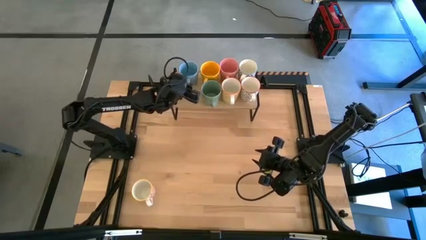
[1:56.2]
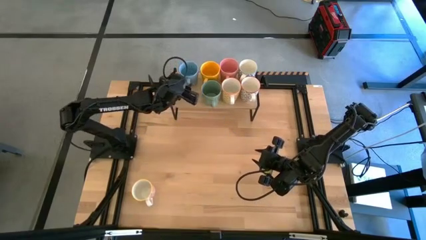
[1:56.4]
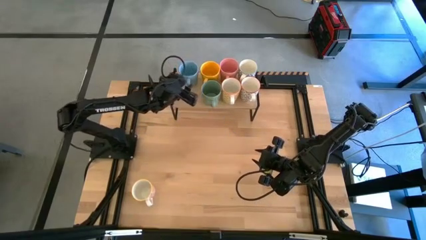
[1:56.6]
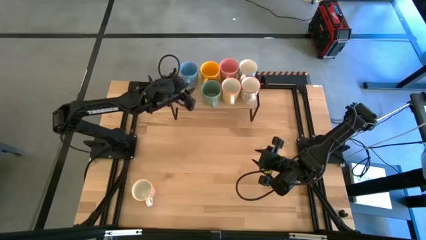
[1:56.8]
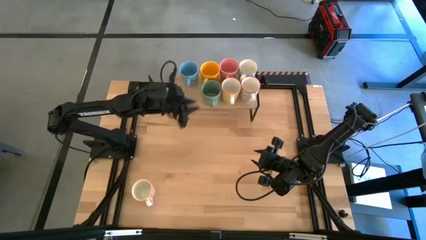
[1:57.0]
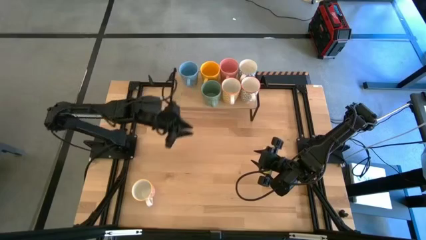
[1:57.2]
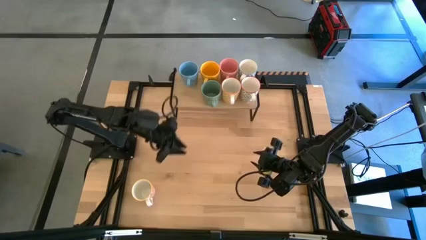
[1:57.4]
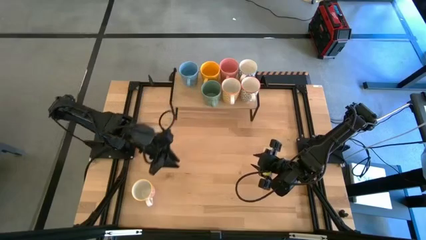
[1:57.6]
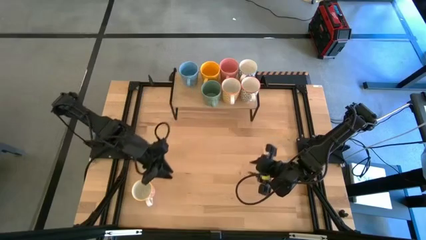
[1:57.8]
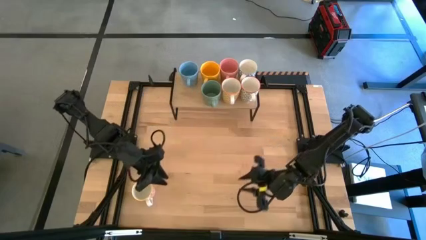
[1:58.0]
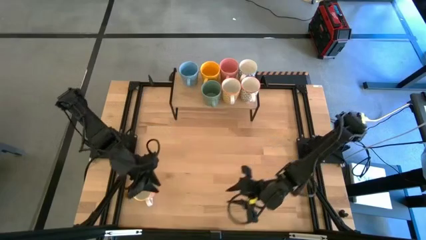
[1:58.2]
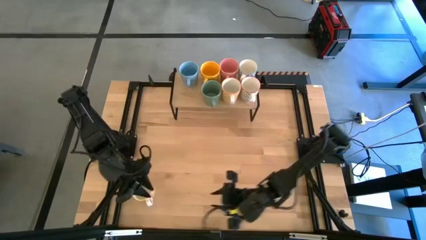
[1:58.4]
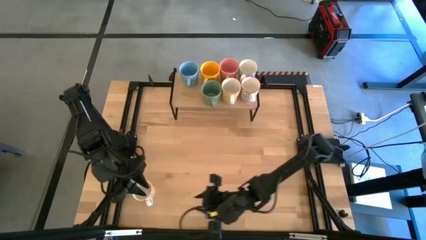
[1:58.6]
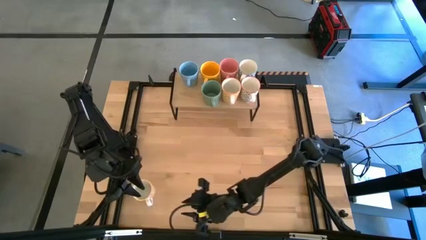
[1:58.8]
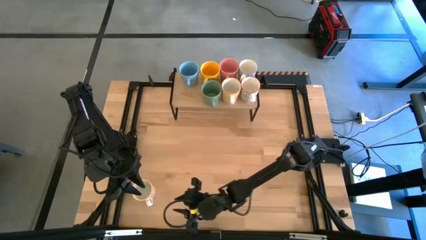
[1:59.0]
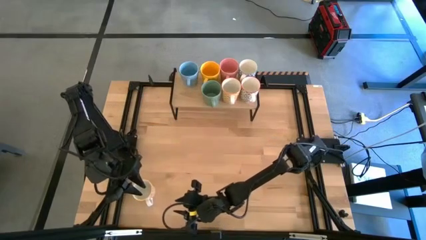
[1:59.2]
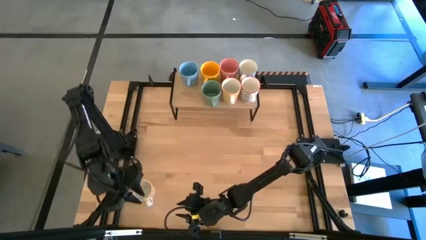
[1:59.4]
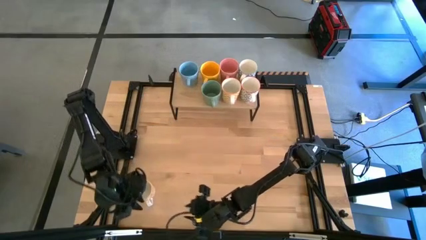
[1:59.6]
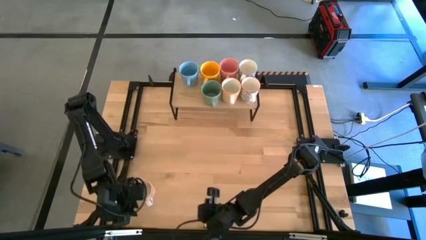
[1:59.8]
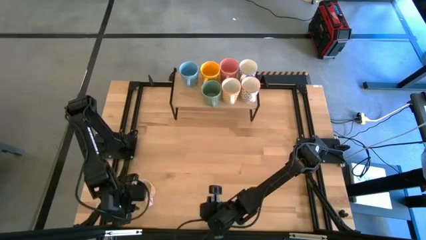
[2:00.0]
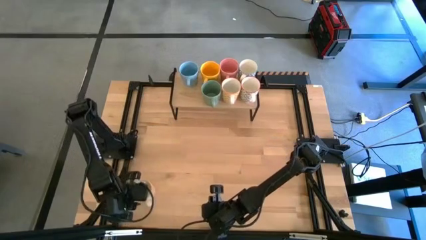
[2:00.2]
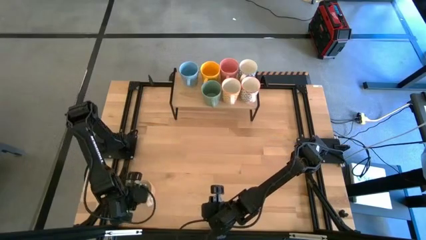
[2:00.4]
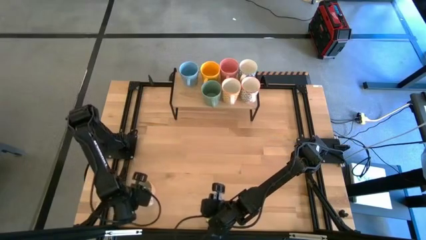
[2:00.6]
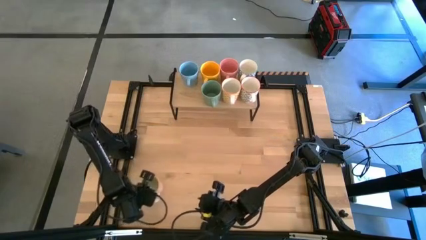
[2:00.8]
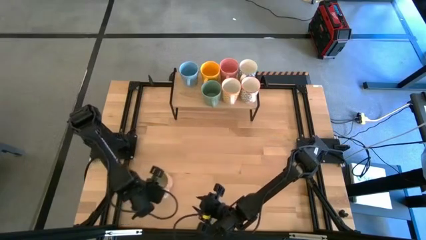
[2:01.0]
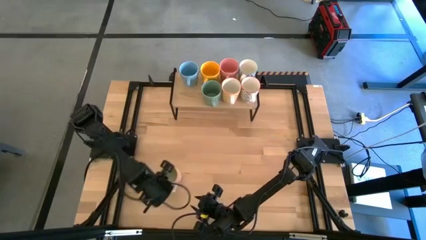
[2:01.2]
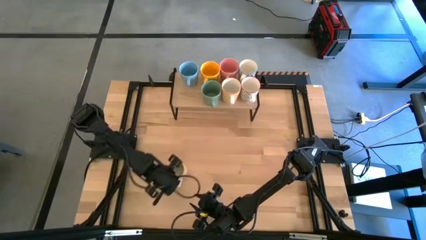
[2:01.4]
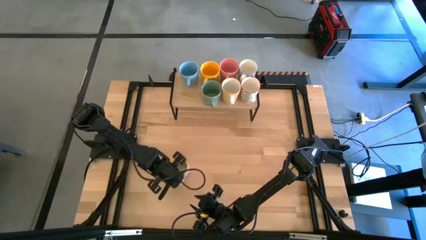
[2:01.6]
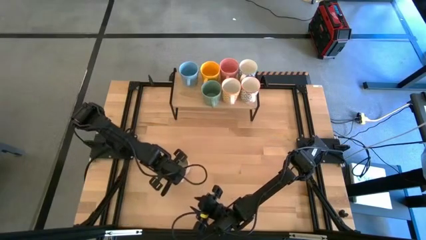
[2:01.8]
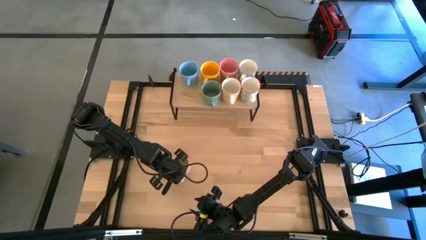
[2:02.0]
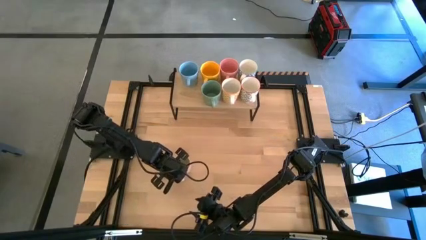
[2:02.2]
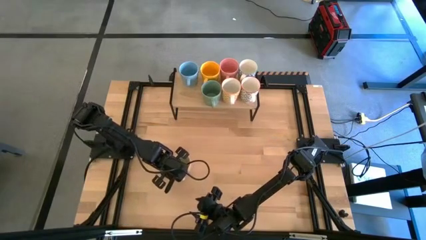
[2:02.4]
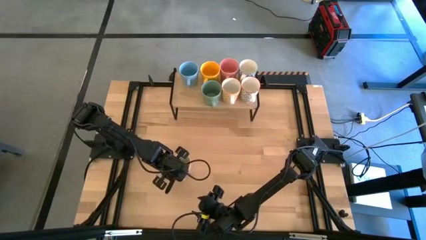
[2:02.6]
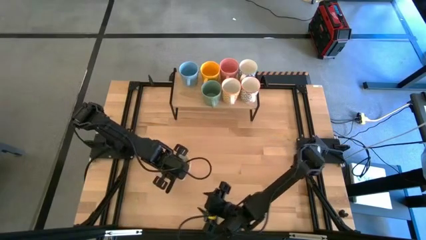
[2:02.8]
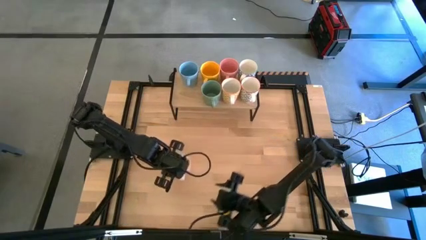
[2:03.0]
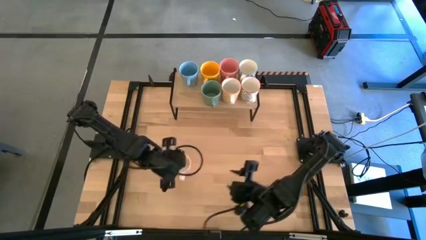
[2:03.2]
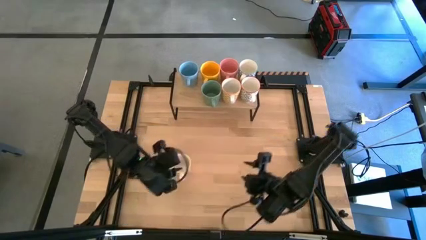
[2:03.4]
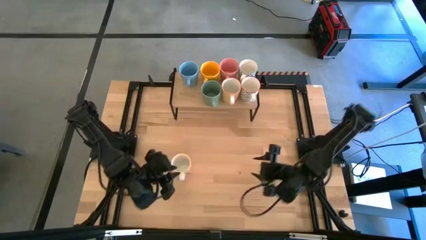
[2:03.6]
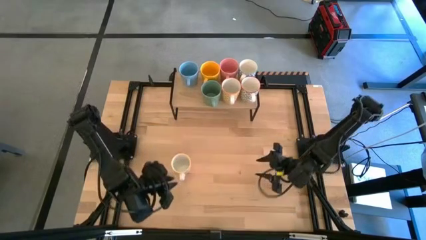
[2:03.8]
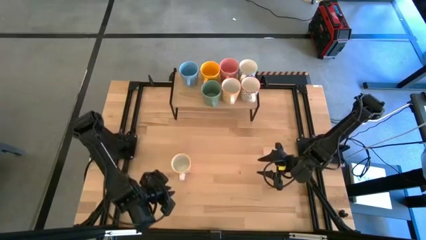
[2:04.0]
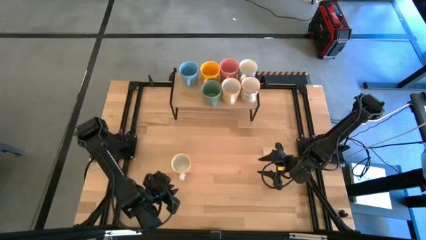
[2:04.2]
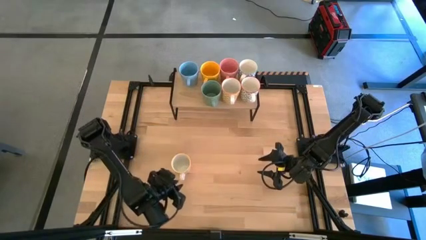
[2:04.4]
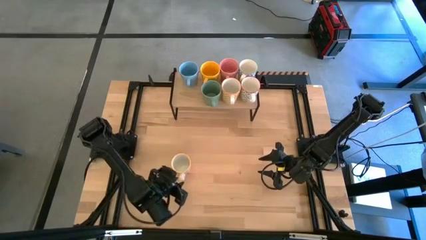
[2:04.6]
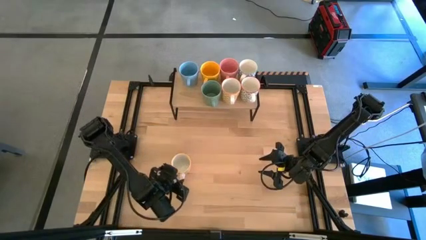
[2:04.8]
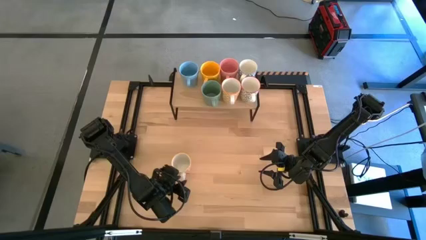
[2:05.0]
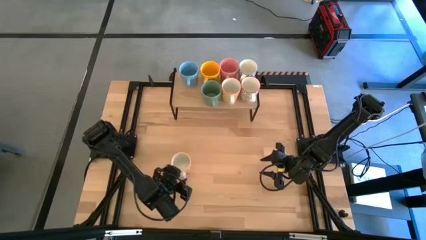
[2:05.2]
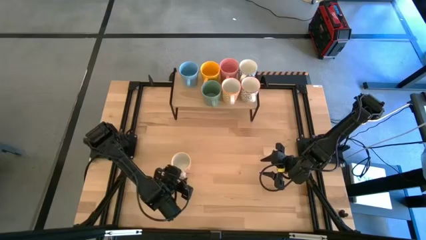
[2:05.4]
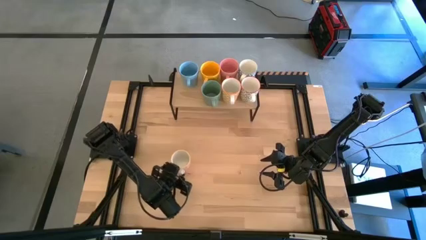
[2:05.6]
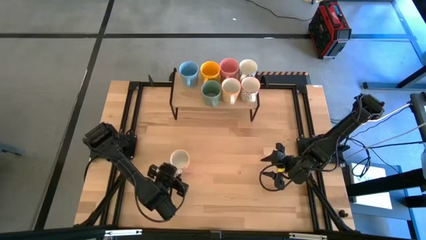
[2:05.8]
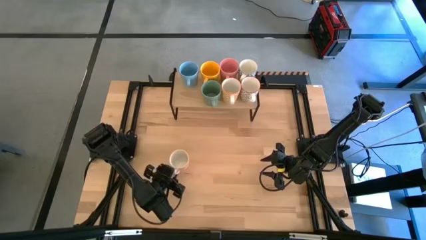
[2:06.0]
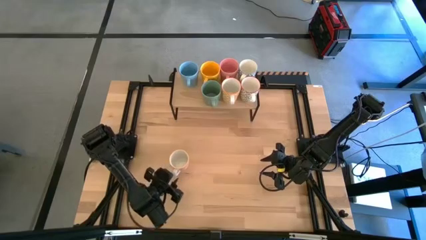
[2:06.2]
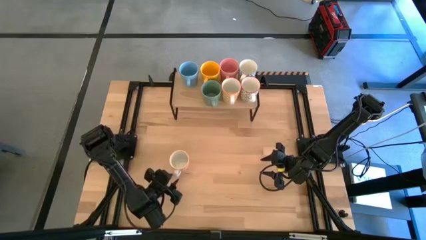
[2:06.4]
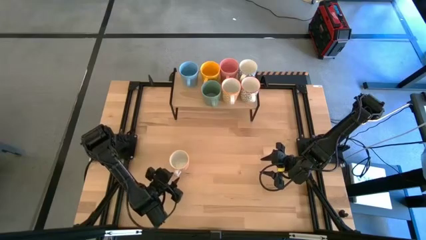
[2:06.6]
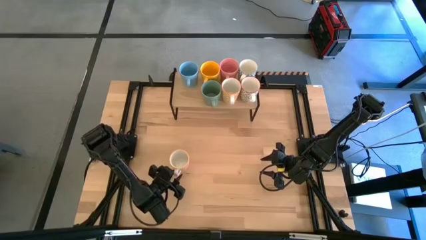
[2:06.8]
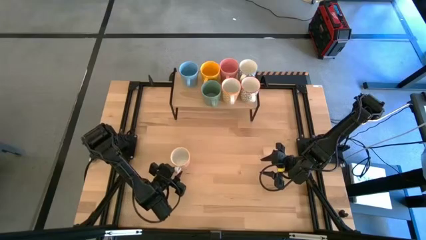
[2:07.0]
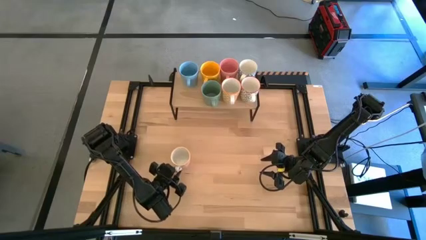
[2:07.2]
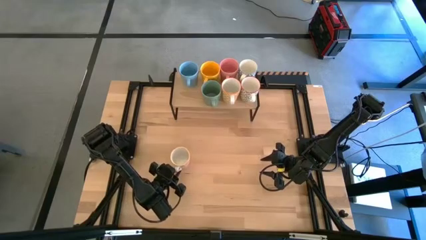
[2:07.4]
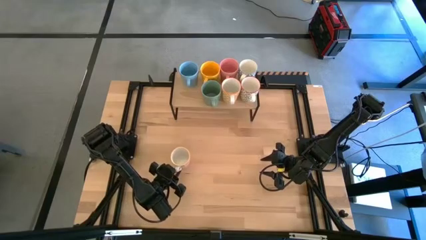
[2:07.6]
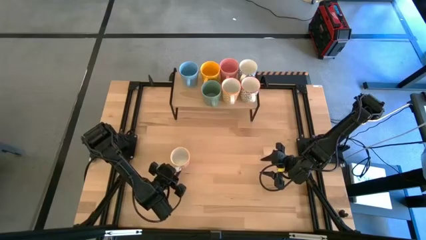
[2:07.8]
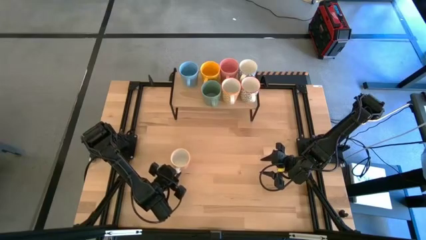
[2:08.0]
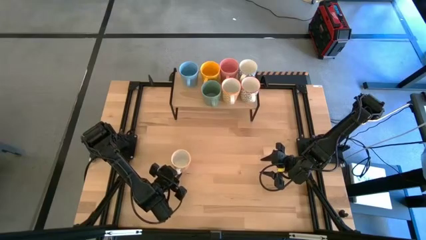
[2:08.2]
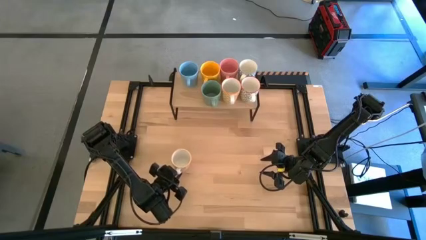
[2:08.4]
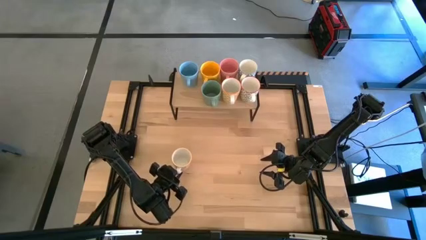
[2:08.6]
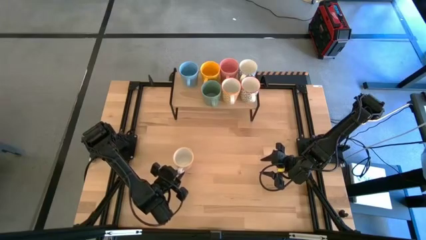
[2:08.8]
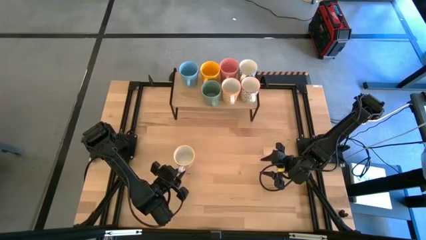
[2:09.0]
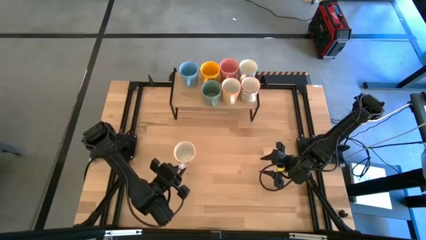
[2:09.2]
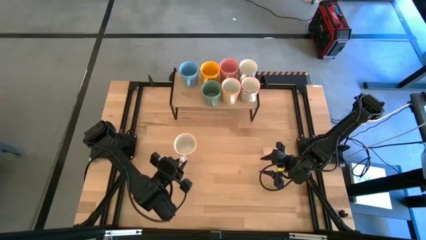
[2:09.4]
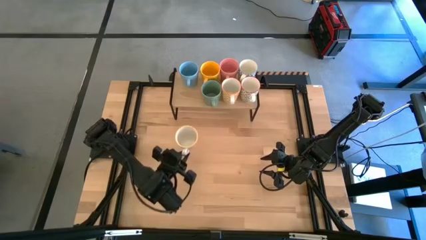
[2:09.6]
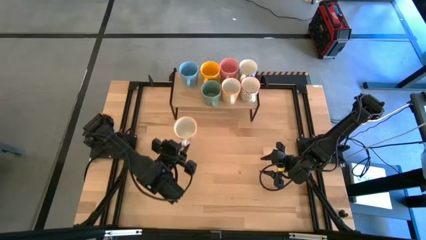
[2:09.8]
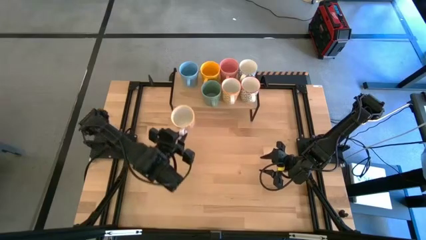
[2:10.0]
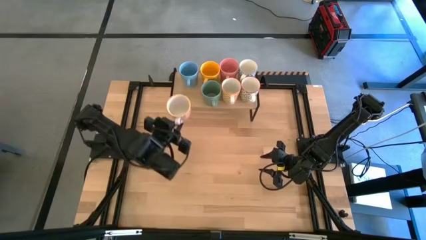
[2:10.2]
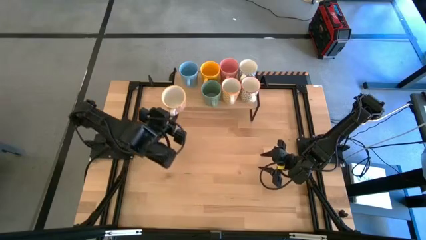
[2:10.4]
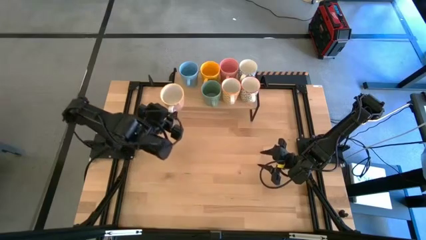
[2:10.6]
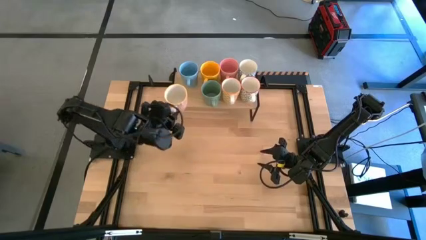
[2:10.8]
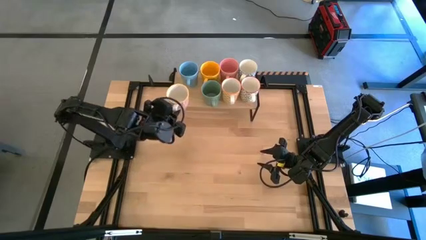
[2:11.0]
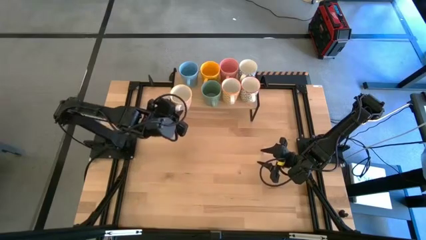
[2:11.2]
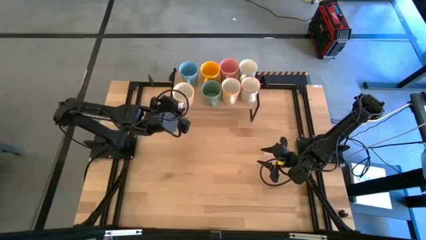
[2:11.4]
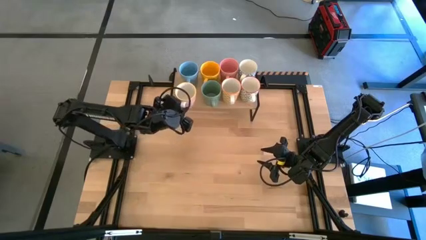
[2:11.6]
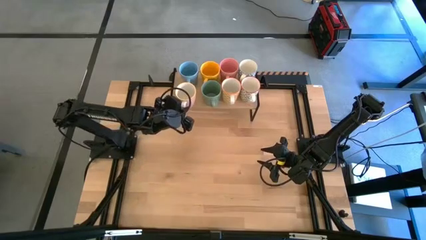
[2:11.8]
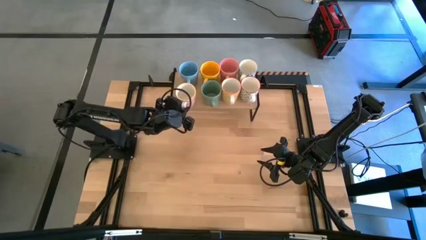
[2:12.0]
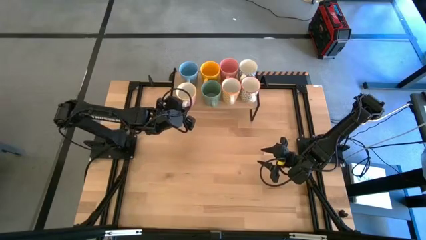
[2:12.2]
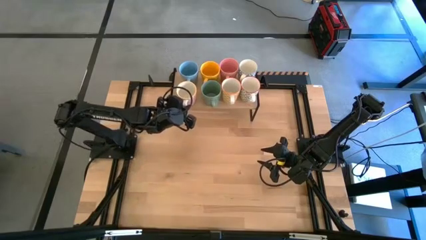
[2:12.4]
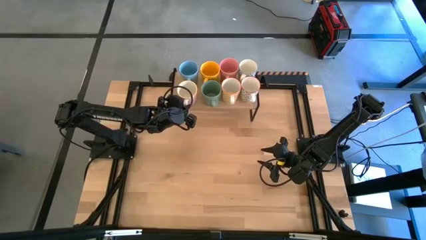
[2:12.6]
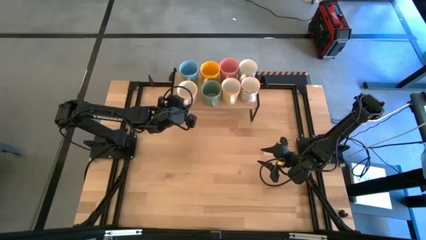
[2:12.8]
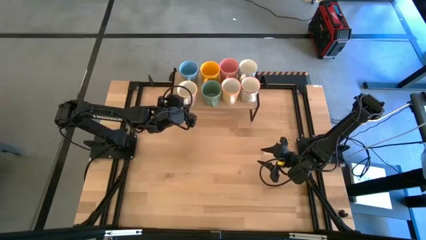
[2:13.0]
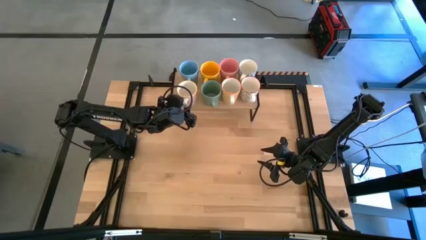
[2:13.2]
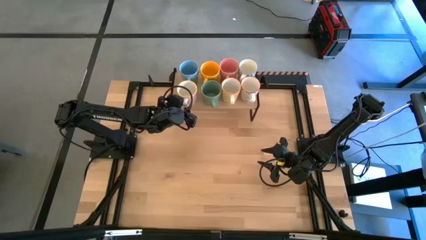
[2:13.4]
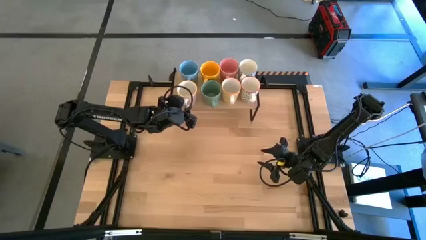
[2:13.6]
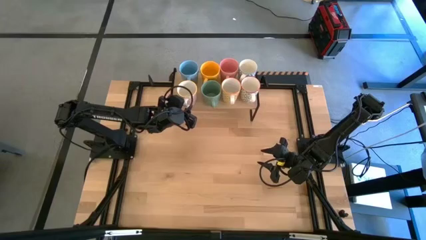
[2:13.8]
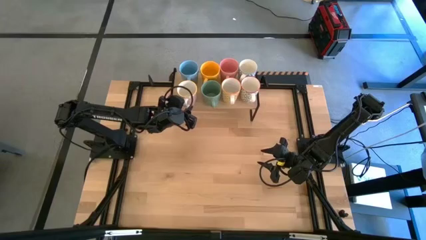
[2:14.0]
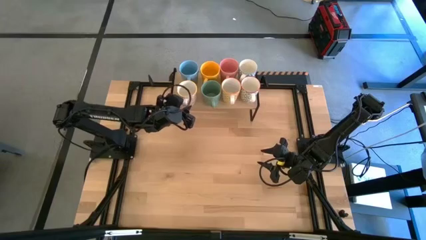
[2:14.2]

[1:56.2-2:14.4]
Task: Place coffee mugs
Put the orange patterned mug on the shelf
